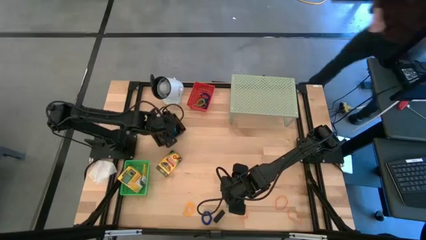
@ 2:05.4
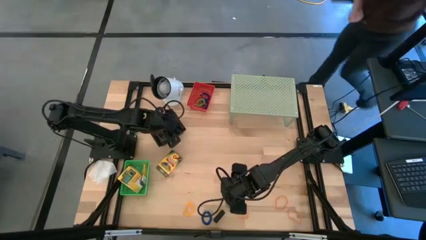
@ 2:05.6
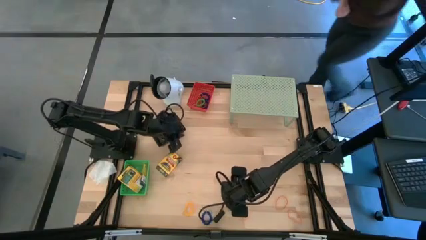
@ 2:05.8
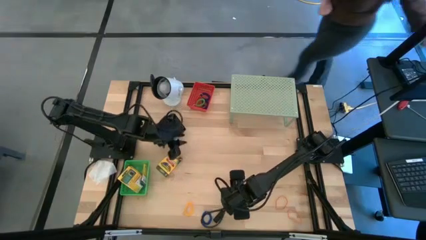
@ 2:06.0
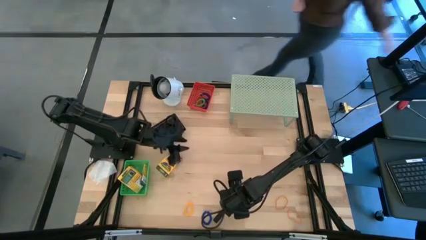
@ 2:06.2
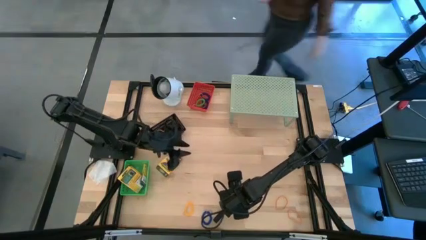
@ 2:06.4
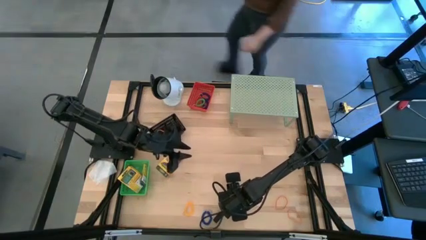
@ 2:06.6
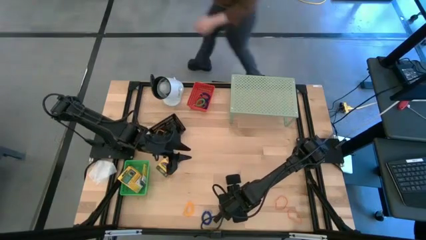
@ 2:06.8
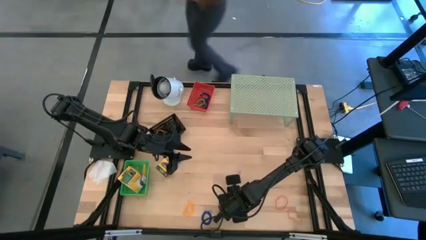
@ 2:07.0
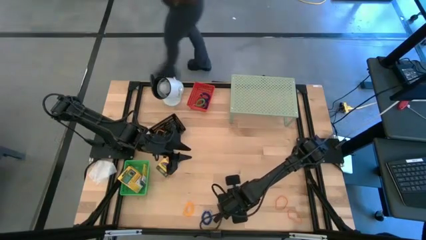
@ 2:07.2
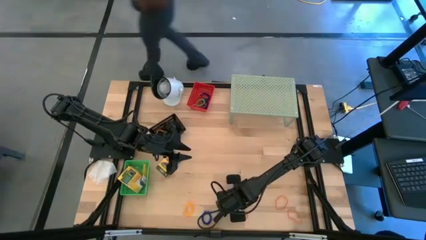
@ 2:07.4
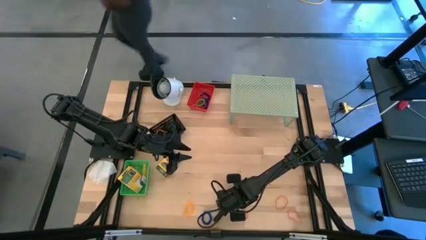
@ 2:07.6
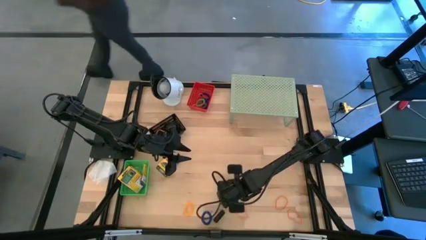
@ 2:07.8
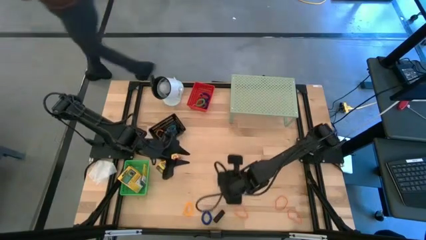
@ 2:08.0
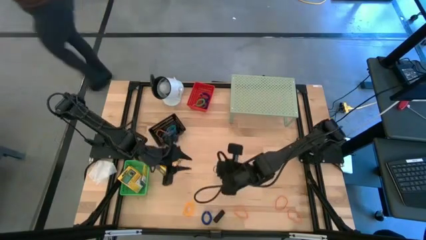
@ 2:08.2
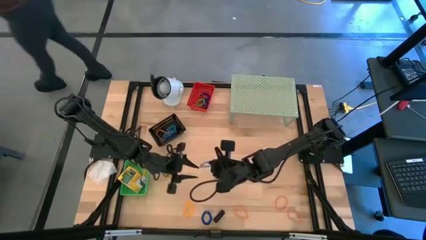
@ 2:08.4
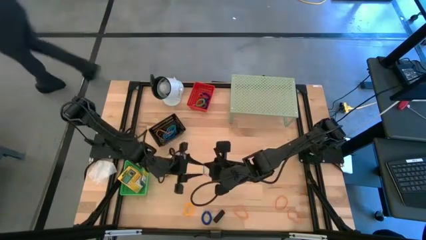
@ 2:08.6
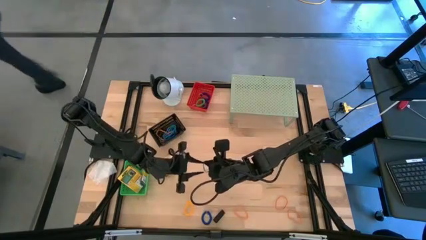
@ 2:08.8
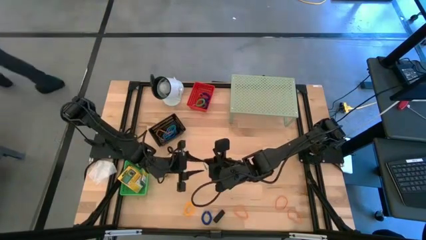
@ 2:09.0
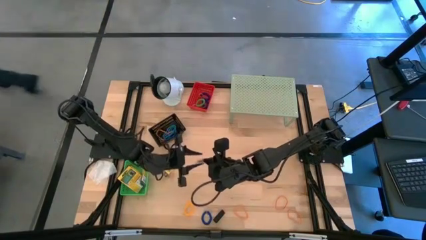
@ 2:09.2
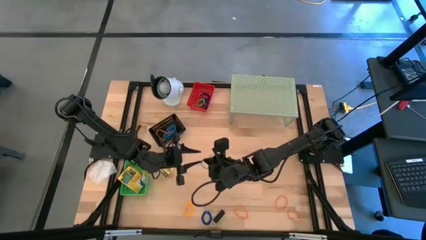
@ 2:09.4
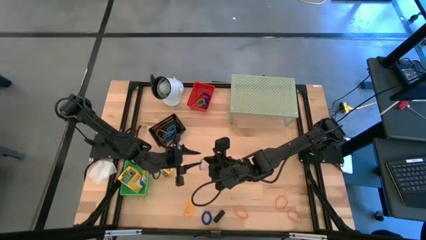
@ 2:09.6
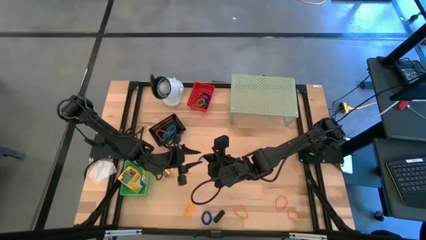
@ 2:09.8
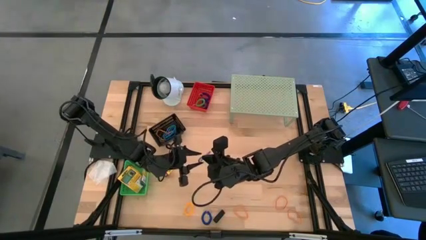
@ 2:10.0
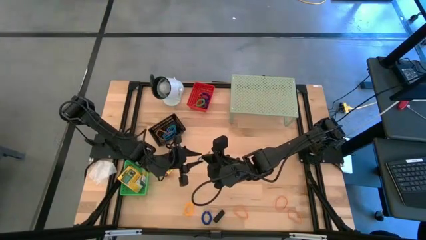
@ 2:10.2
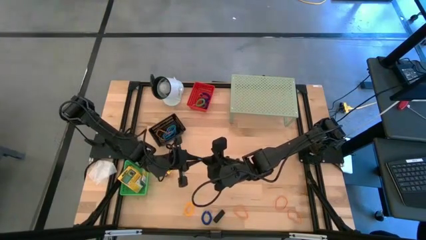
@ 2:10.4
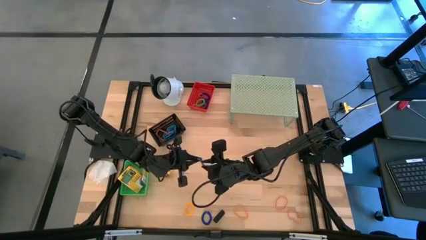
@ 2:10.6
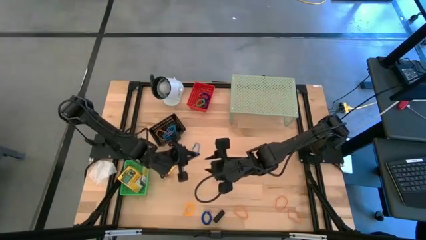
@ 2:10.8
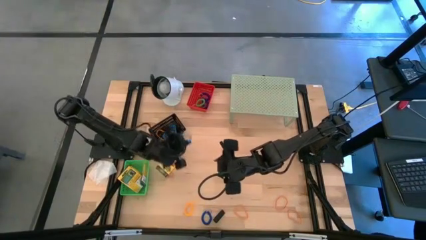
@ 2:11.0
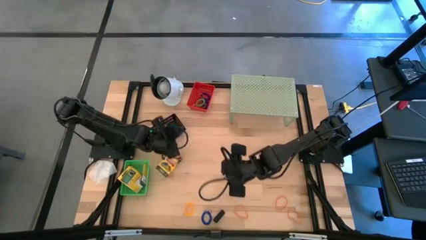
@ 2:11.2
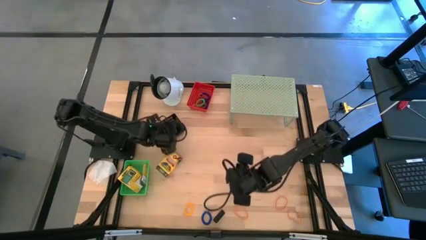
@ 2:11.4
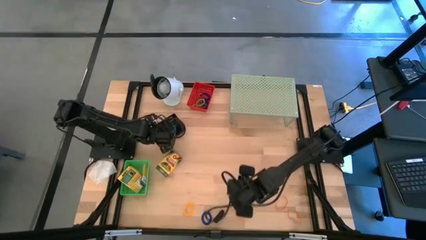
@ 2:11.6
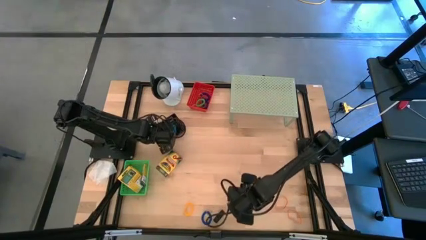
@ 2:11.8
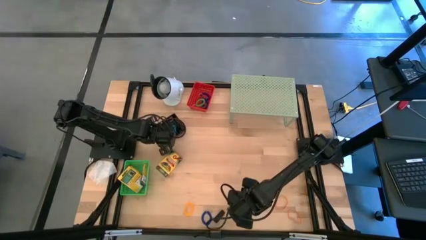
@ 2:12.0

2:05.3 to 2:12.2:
Task: Pick & Place Office Desk Supplies
Put the blue rubber band into the black bin

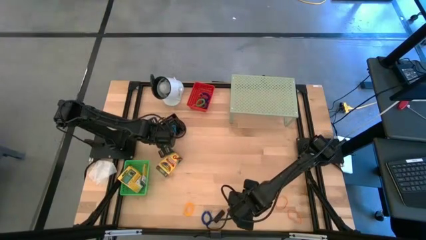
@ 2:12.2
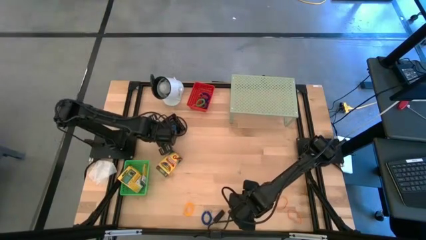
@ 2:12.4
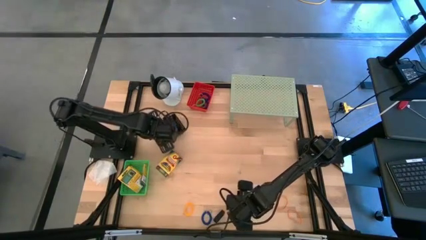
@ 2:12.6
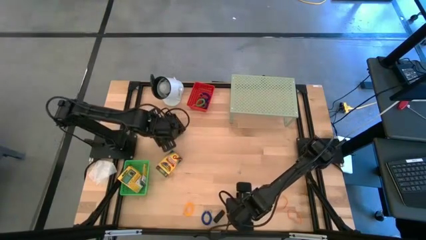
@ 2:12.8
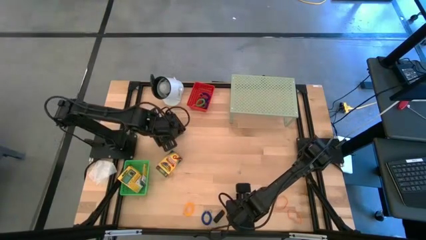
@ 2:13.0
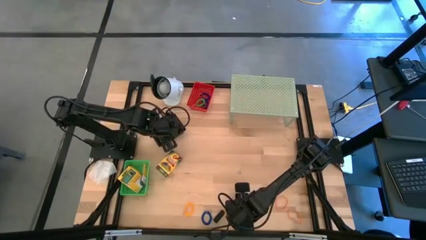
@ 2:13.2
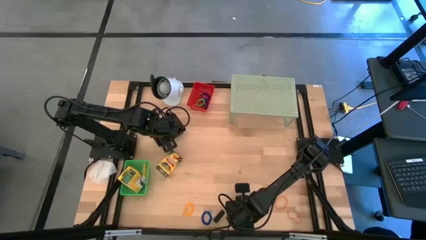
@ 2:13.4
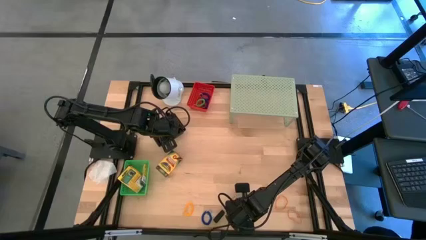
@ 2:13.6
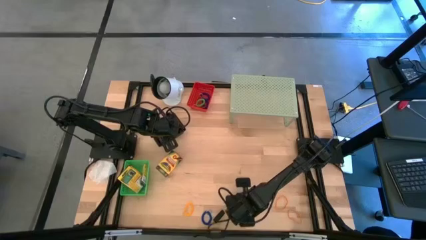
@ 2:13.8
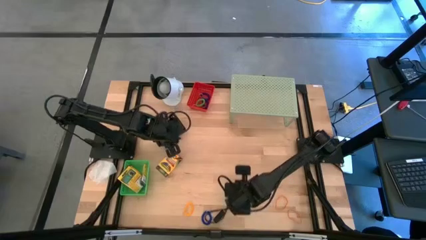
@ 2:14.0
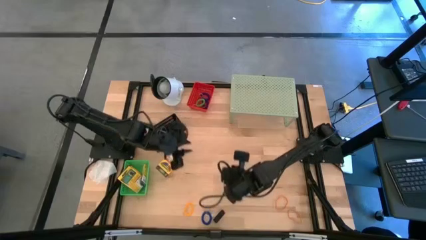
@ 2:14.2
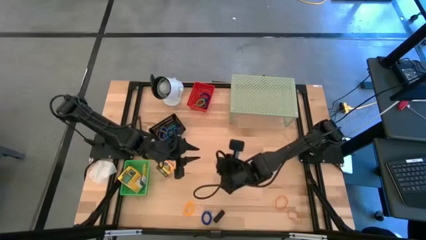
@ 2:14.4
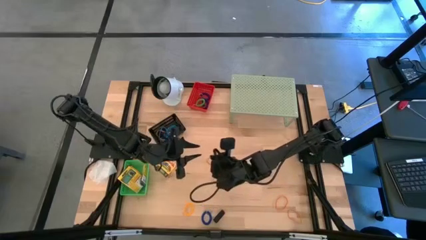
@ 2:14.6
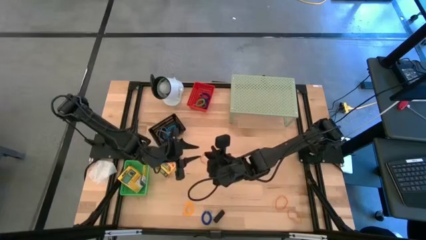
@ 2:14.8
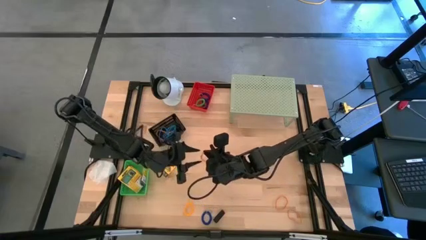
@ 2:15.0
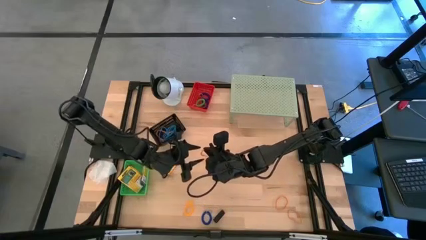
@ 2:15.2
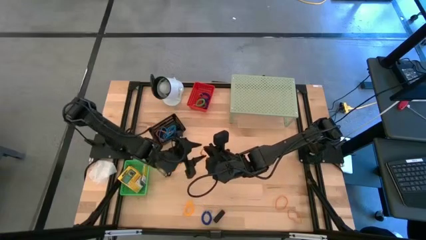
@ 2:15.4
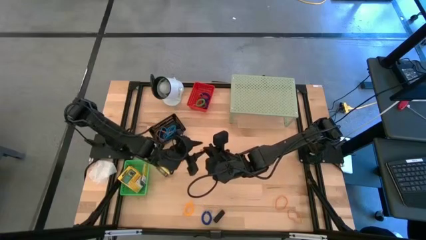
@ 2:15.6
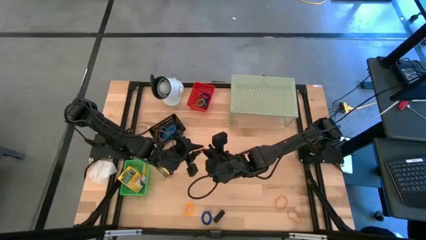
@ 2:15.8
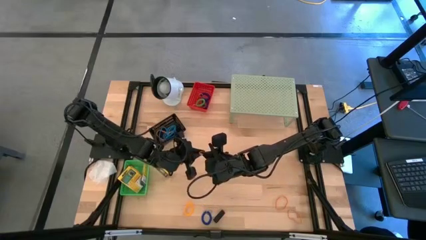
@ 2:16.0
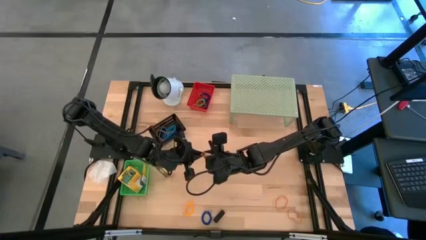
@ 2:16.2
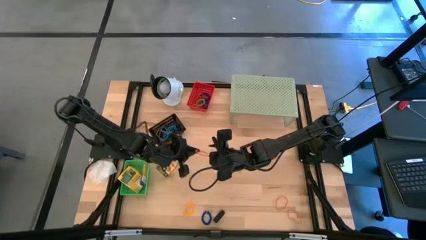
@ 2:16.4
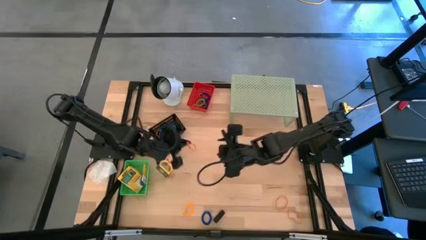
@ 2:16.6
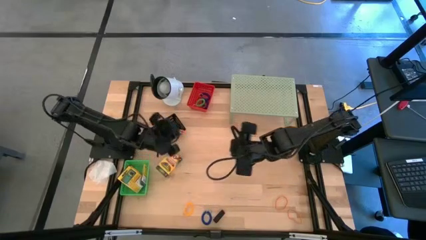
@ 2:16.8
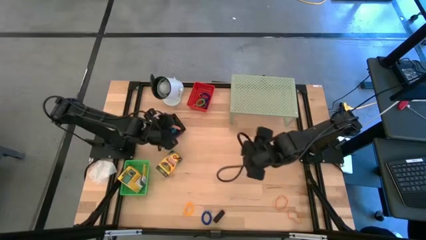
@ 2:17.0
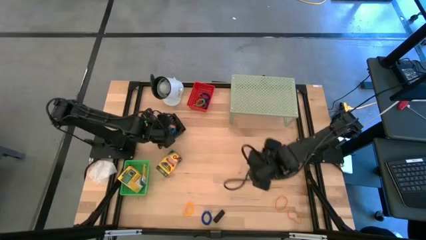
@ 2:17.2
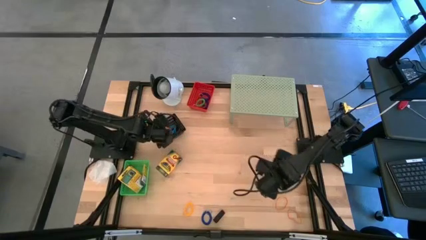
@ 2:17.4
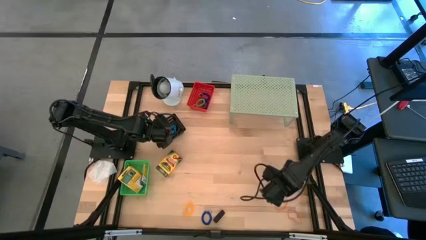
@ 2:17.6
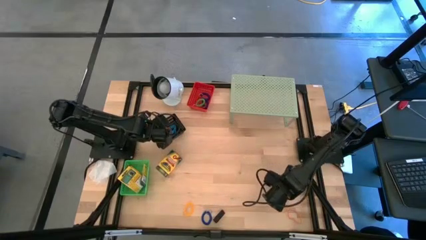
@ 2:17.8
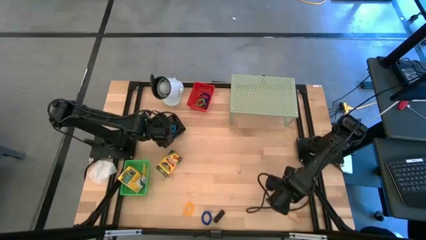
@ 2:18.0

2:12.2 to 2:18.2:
Put the orange rubber band into the black bin

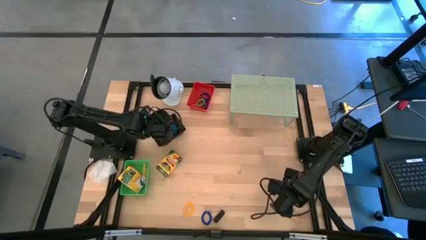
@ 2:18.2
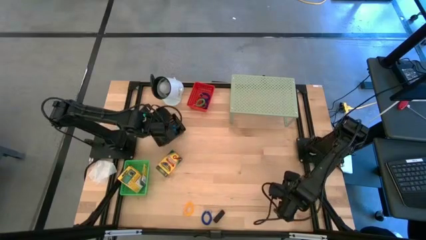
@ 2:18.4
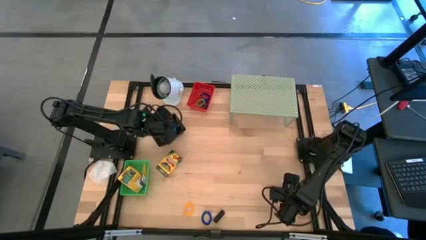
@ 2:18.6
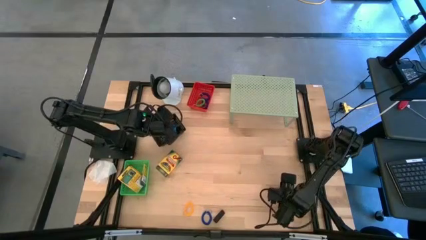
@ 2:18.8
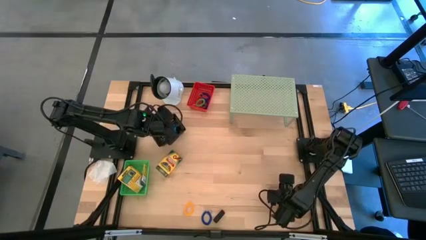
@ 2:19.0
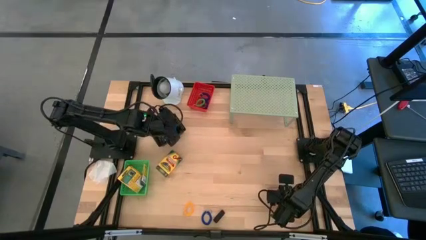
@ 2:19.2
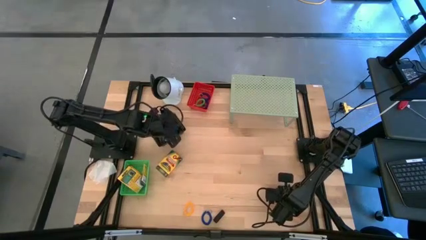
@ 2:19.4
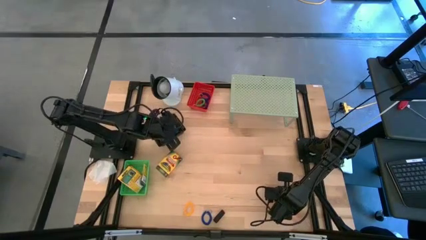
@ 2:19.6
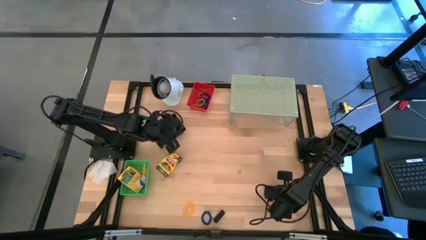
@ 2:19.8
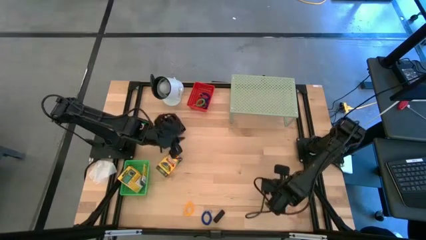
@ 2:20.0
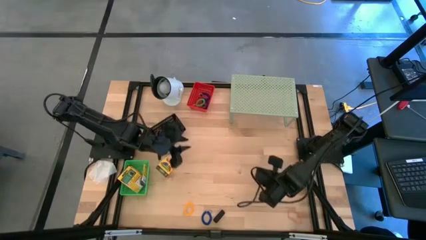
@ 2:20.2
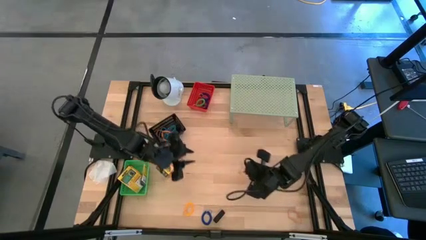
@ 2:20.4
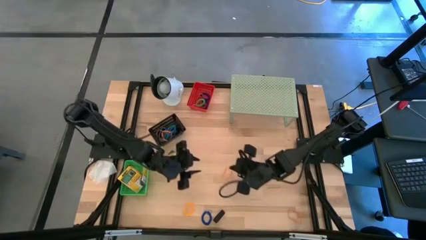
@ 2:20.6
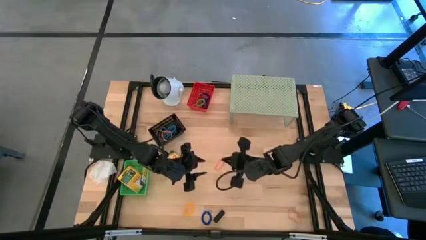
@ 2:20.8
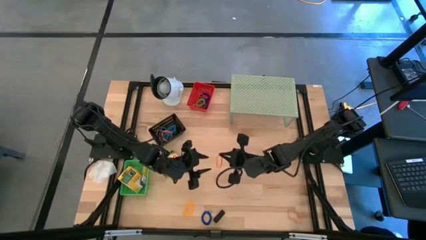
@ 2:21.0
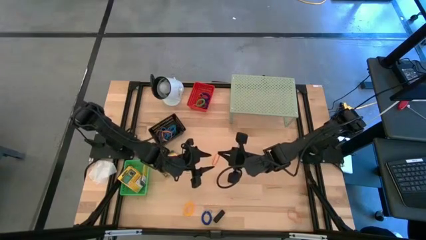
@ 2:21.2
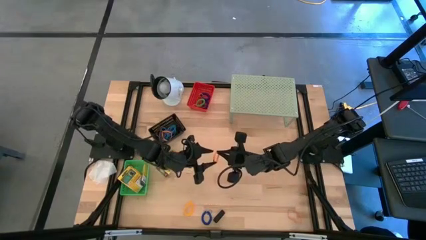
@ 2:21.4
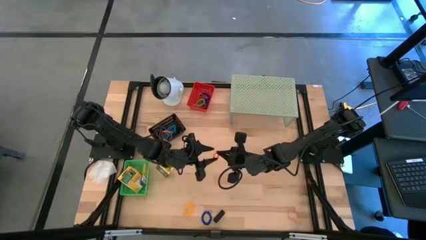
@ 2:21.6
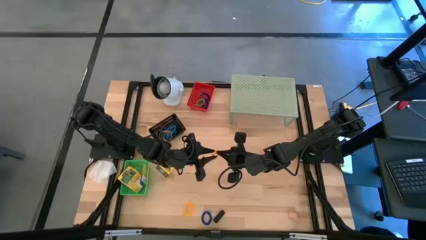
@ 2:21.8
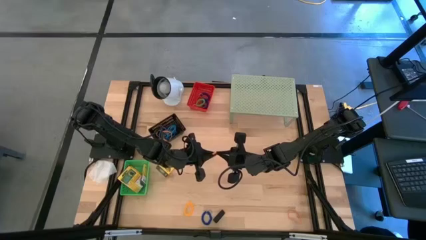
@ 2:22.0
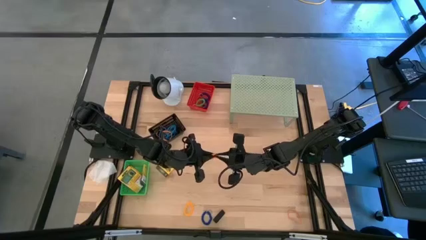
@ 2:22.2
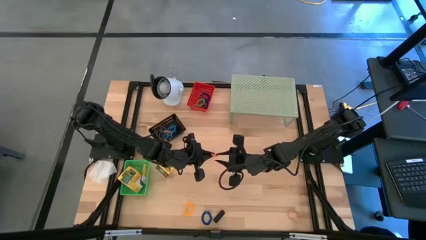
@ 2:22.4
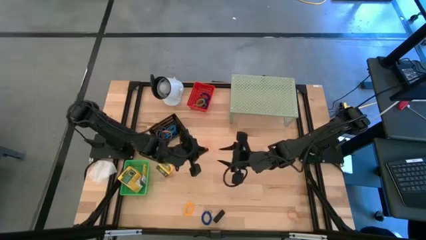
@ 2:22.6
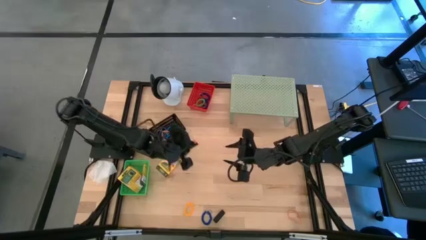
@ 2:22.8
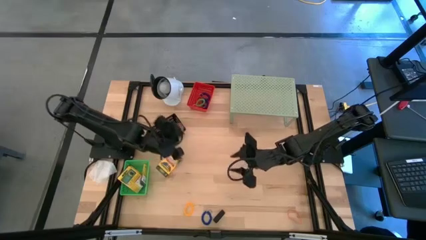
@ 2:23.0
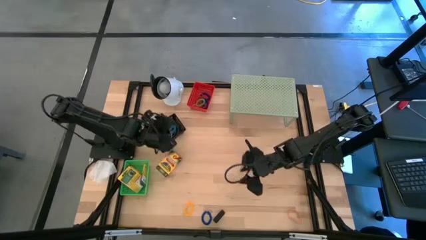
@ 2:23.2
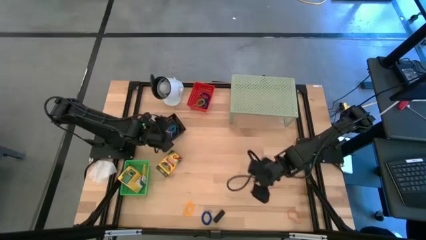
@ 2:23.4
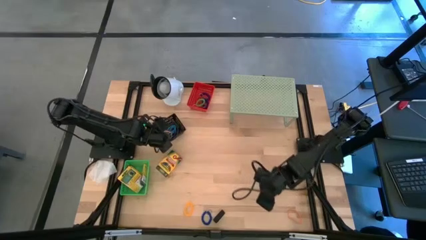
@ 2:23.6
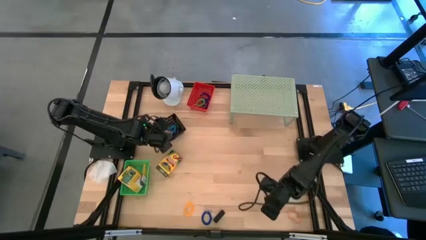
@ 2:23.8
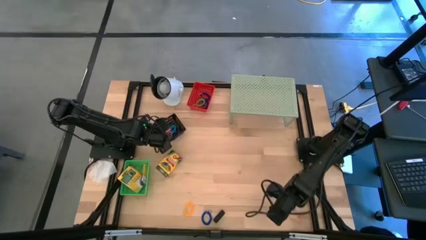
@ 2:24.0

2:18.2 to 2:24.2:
Put the orange rubber band into the black bin
